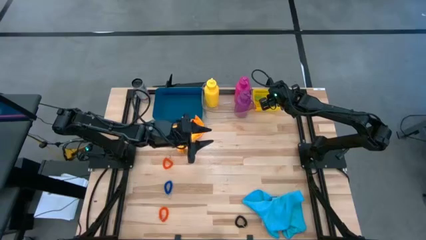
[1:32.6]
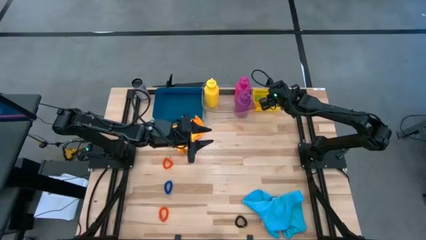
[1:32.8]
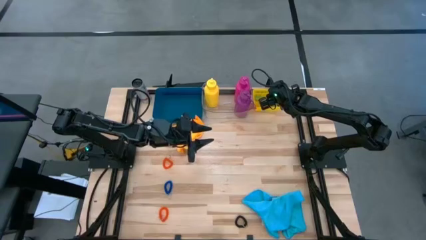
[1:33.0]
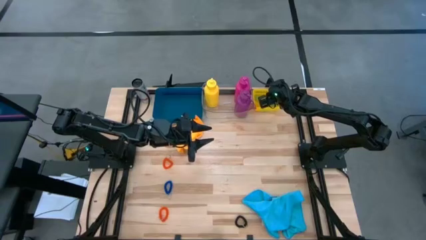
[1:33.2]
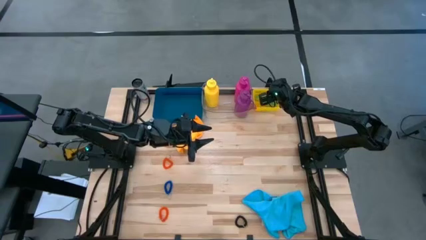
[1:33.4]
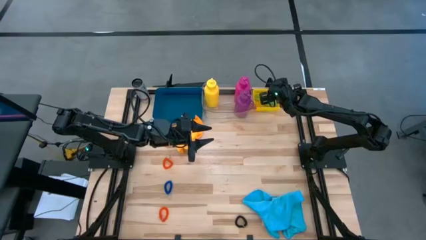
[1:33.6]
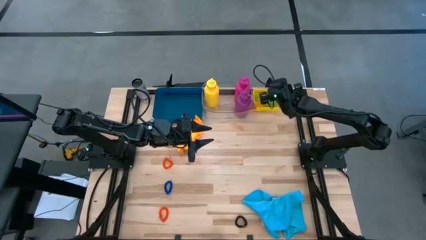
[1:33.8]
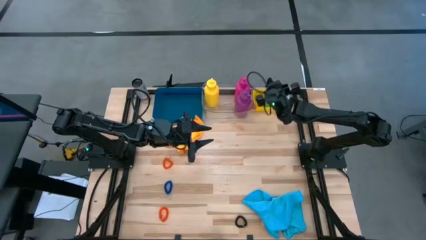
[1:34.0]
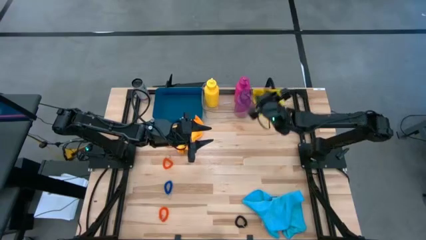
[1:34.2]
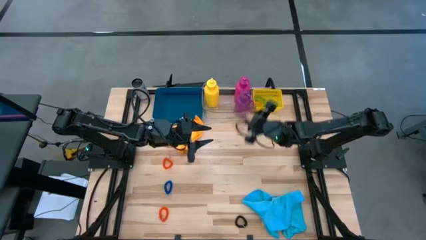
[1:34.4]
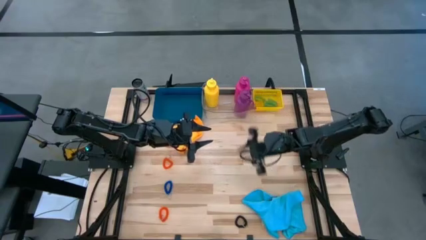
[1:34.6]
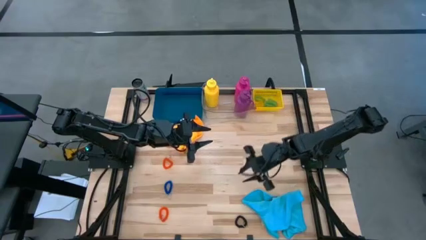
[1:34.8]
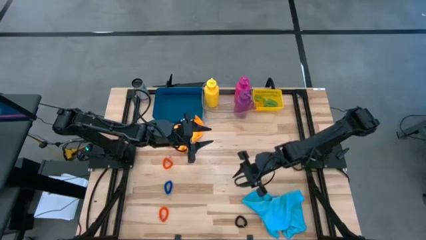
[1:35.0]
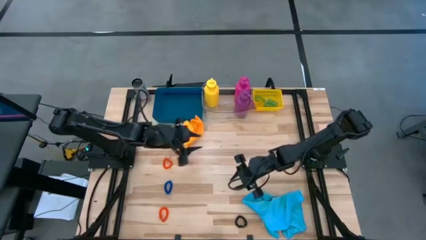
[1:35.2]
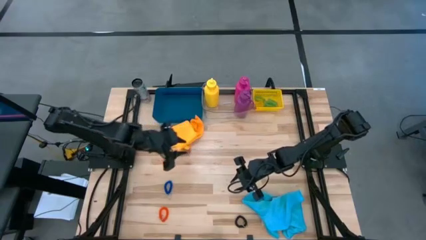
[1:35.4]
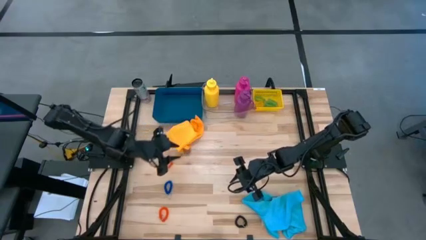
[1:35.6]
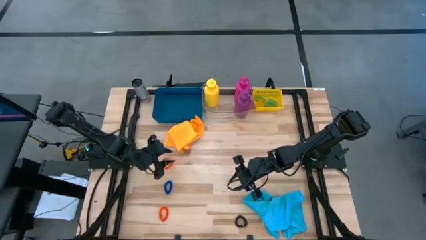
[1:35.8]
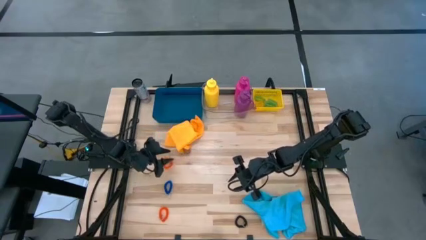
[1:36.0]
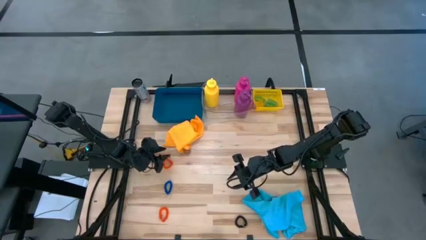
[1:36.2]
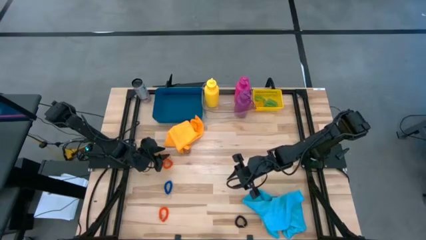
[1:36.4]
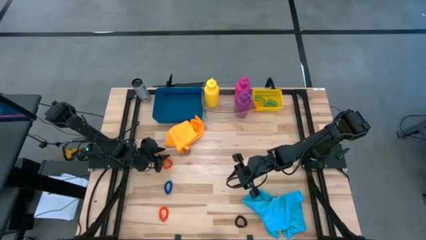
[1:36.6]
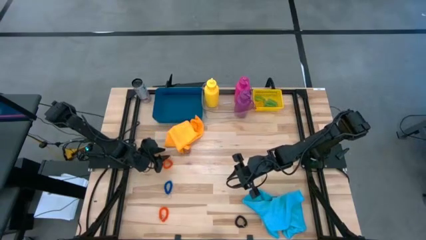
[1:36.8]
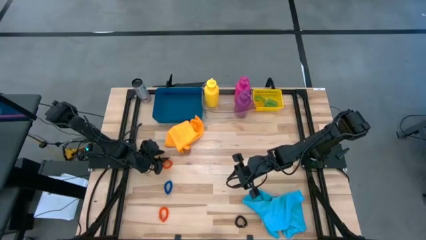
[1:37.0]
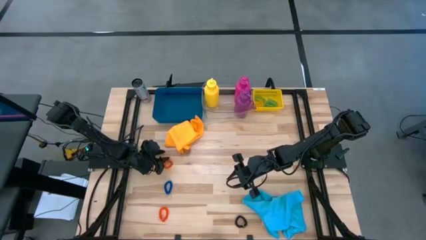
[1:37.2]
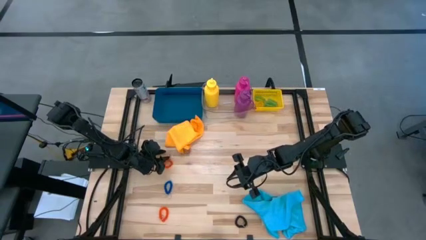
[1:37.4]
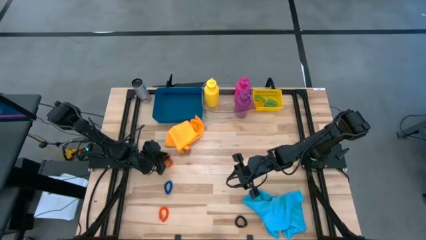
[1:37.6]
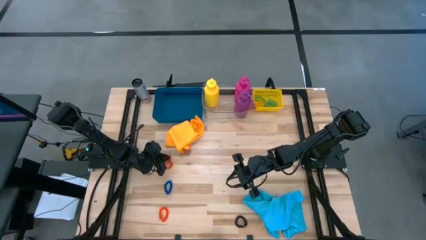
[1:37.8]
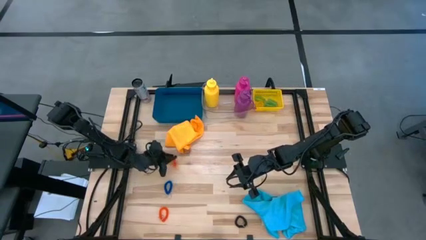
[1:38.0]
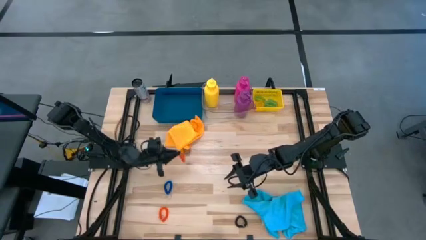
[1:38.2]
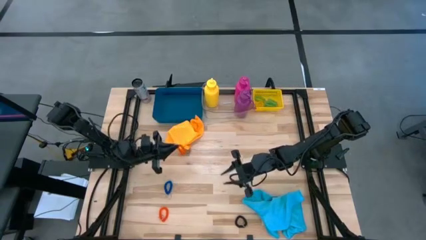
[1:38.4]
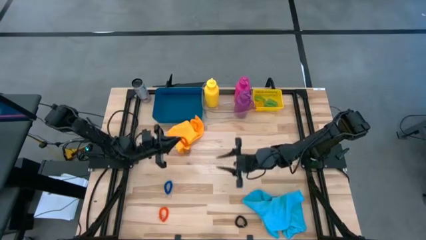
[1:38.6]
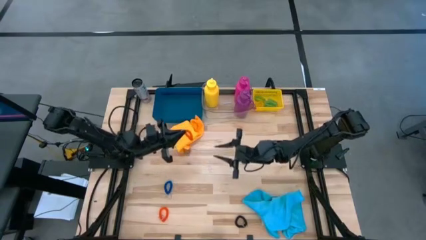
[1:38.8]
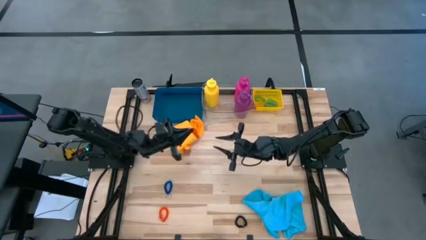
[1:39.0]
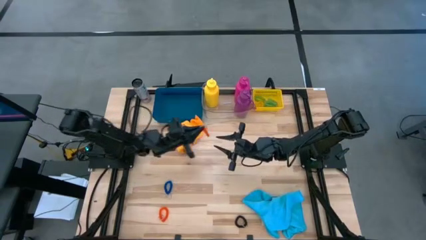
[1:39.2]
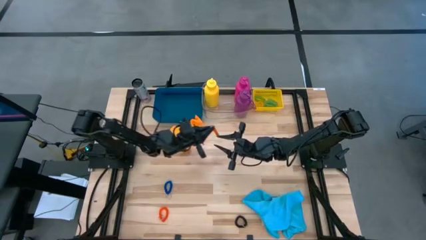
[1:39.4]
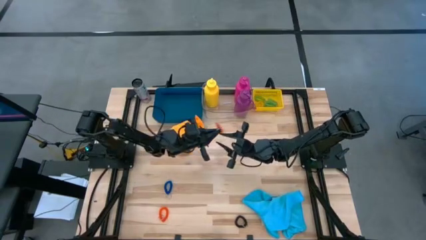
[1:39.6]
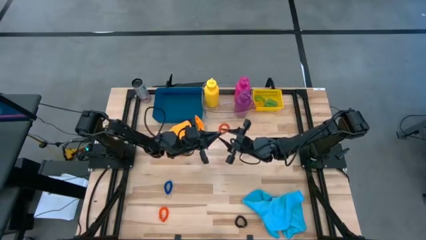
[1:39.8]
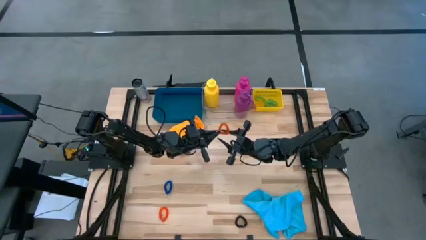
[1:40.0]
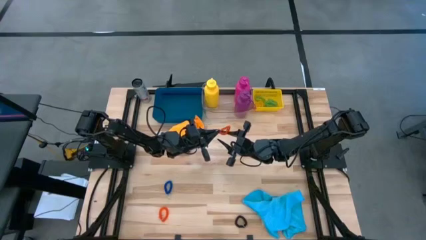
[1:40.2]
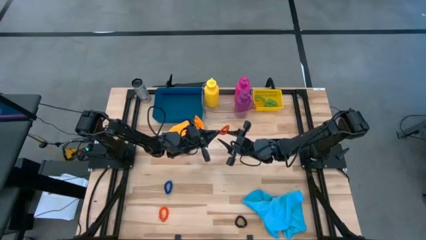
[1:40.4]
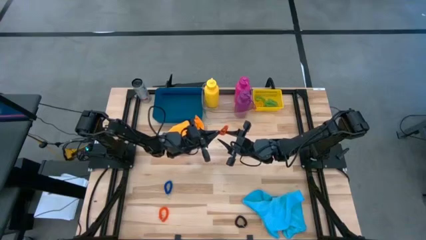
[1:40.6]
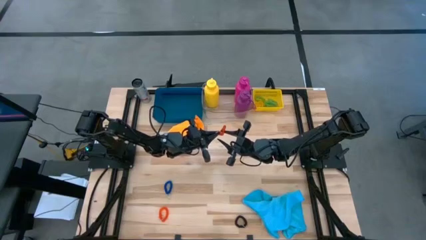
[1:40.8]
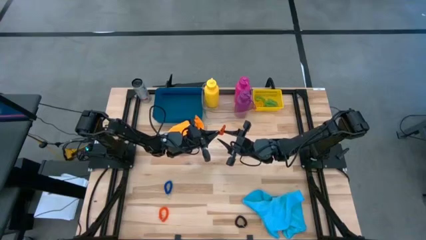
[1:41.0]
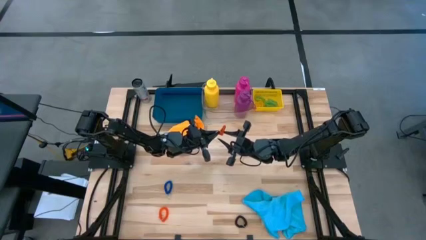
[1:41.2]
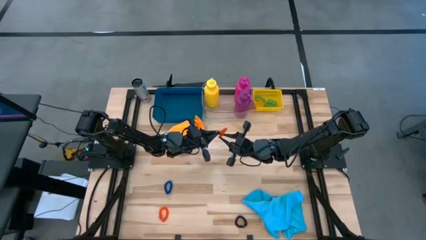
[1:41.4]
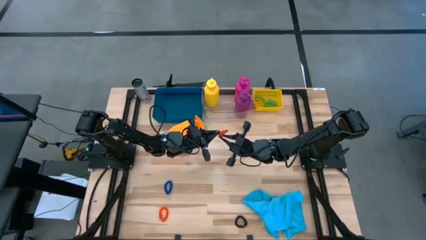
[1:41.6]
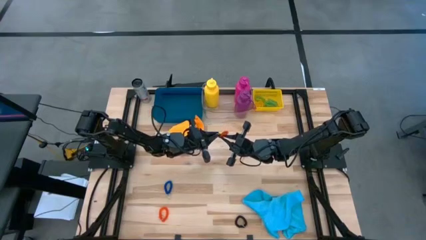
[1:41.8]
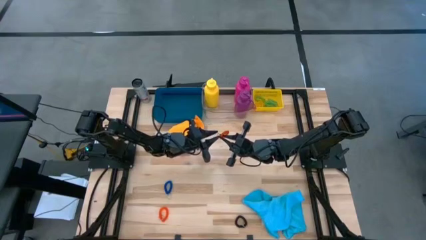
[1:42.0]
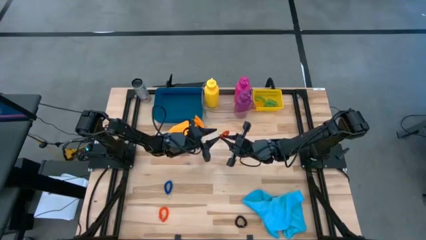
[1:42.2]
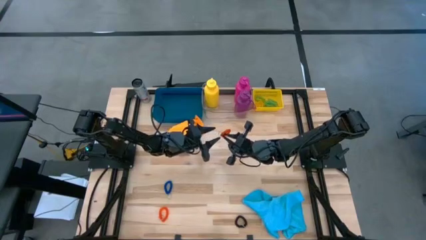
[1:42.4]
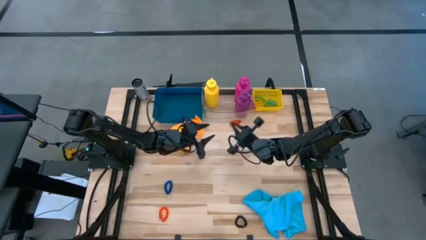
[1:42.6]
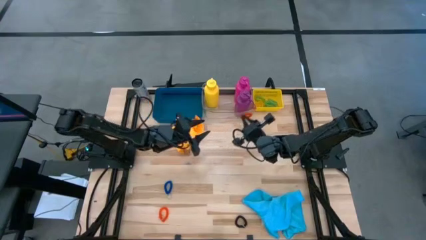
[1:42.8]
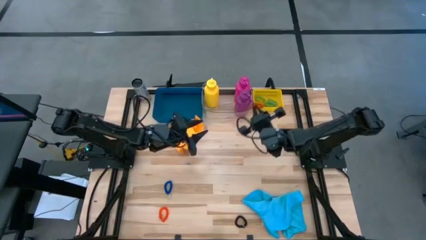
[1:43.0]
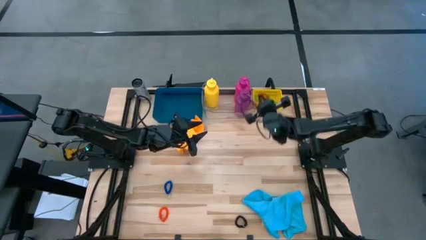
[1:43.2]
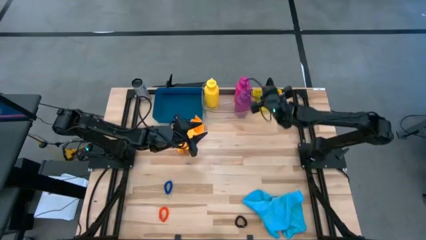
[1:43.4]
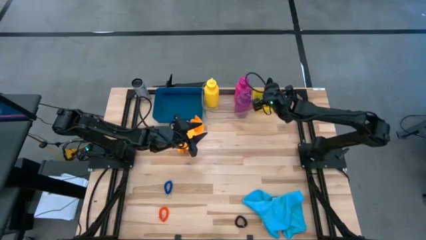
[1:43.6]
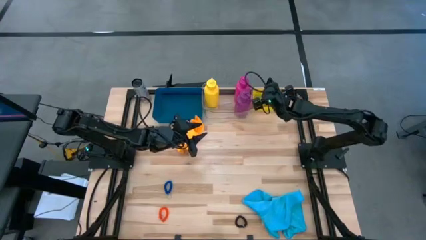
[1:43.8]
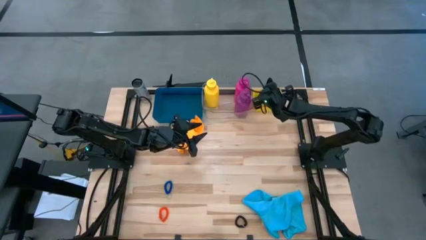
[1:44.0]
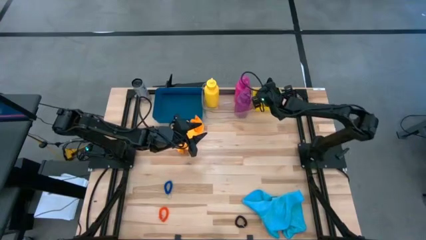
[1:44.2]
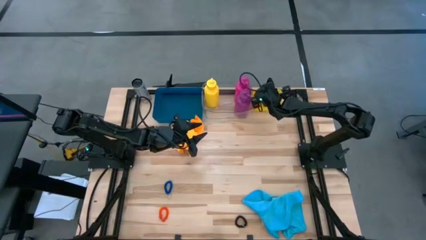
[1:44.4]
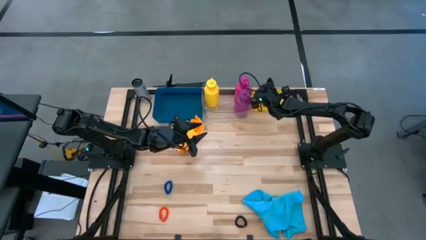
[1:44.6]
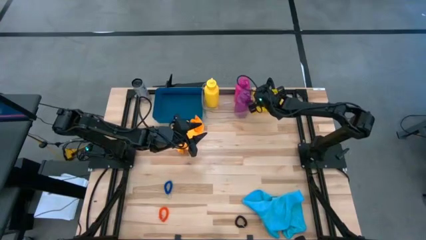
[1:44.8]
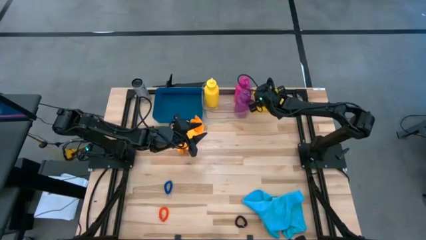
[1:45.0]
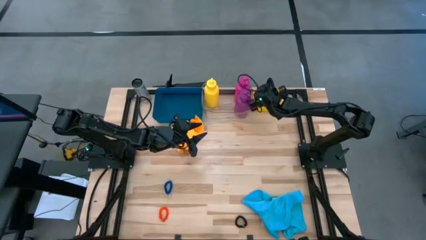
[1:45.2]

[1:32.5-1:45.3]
Task: Pick & Place Sports Items
Put the top orange spring keychain into the yellow bin
